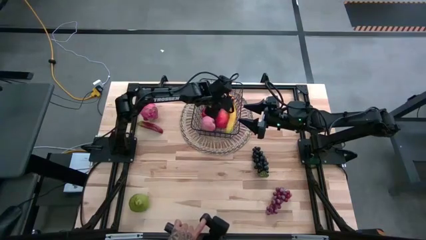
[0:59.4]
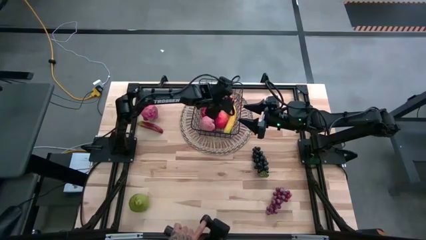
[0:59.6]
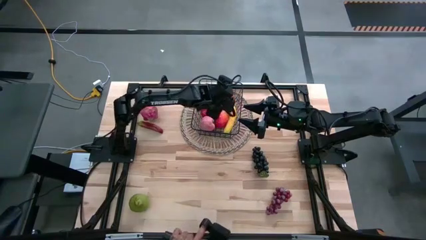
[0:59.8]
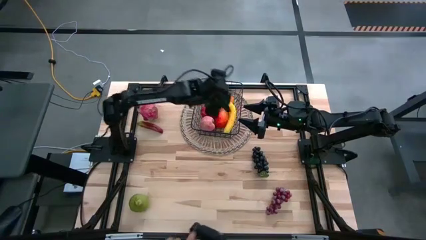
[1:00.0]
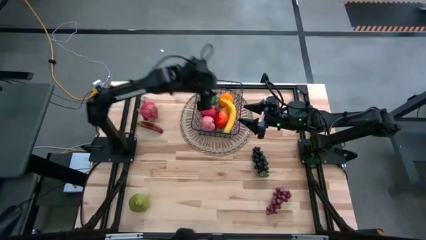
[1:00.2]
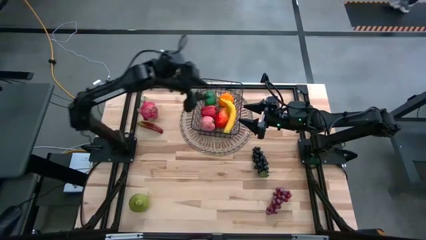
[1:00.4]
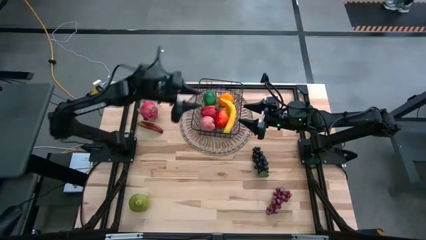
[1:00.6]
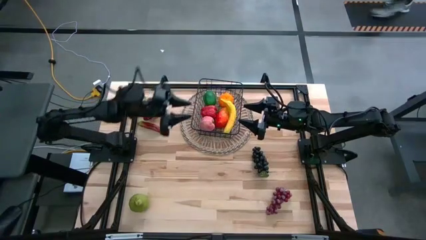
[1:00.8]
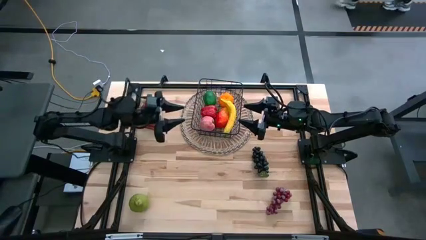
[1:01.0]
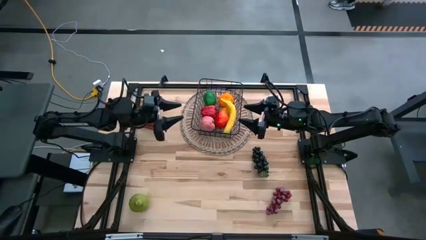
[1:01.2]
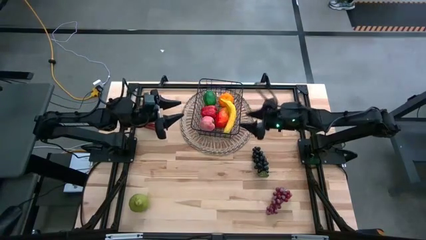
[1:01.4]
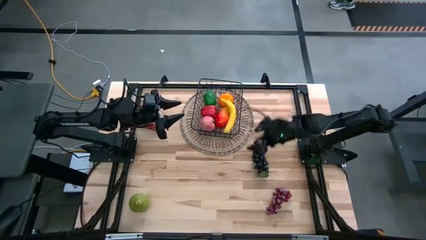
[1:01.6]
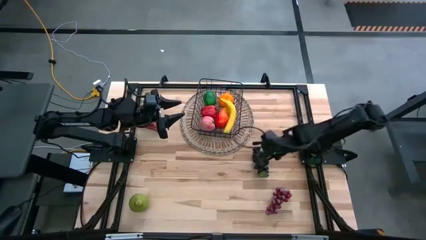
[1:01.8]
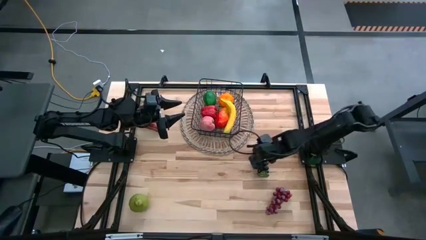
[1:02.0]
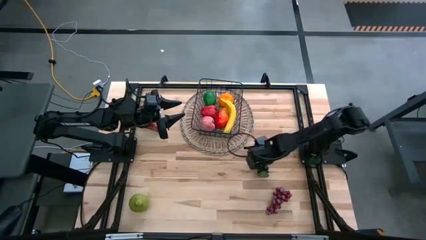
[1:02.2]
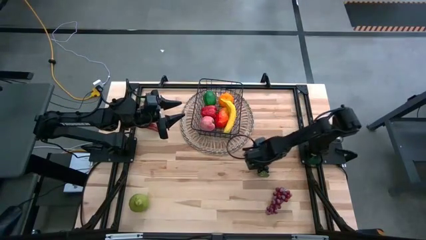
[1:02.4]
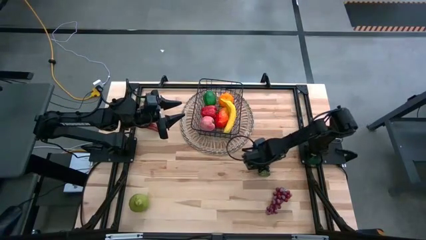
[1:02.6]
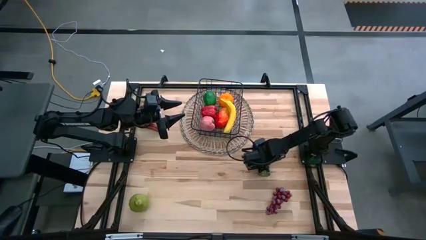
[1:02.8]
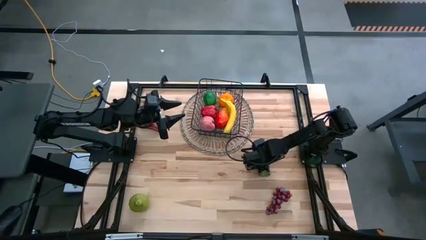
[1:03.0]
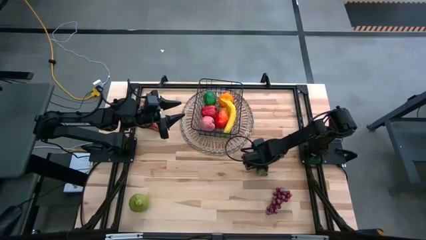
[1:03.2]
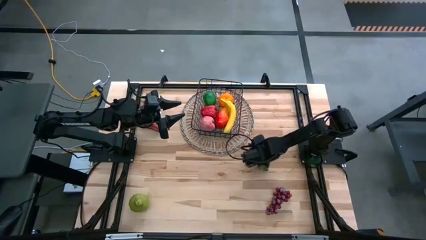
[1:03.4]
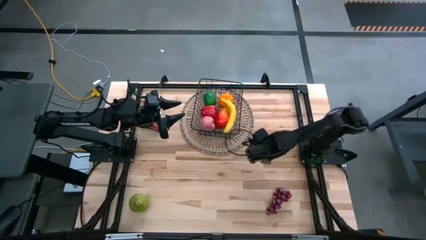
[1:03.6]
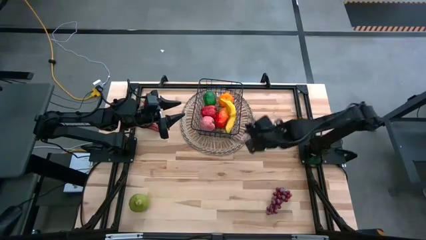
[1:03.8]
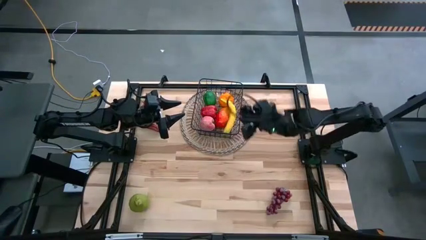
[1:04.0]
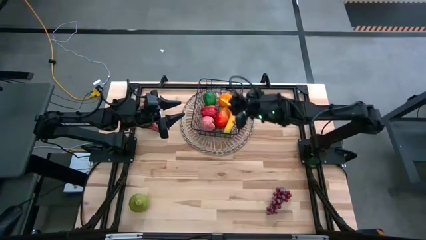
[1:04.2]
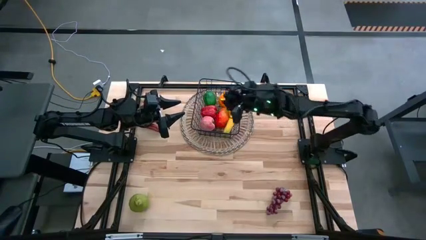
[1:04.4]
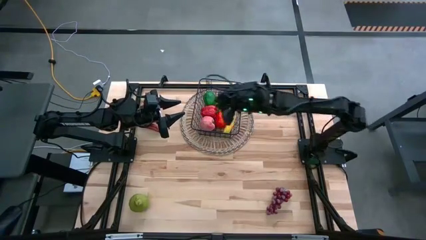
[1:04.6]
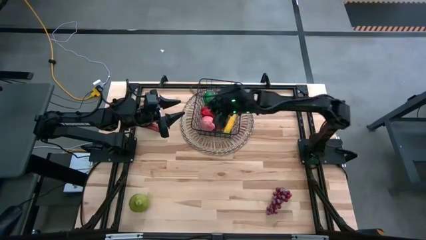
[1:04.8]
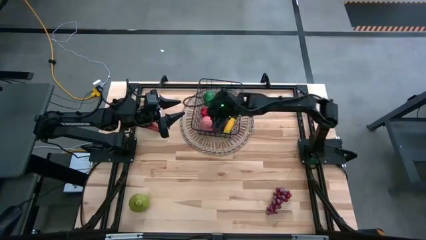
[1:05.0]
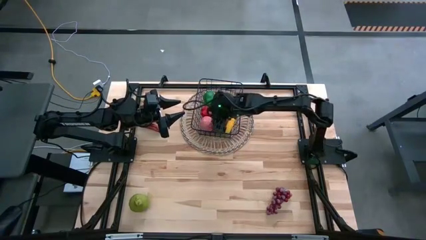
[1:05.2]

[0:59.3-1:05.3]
Task: Build produce basket
Put the black grapes into the black wire basket

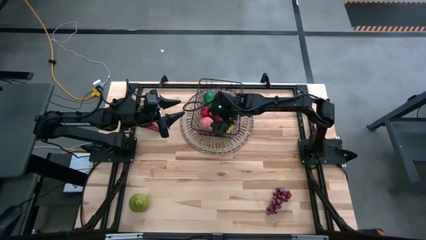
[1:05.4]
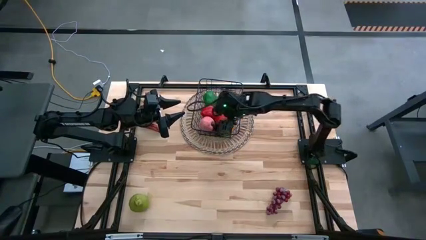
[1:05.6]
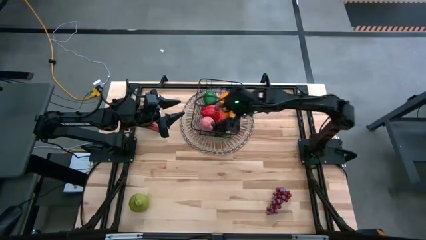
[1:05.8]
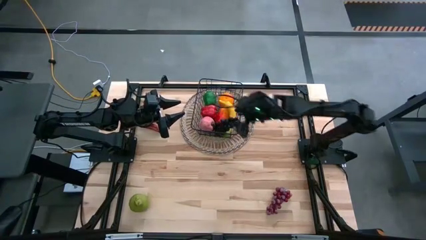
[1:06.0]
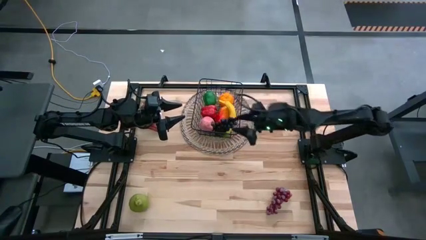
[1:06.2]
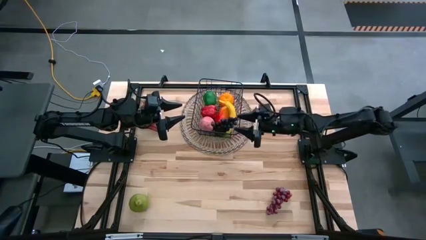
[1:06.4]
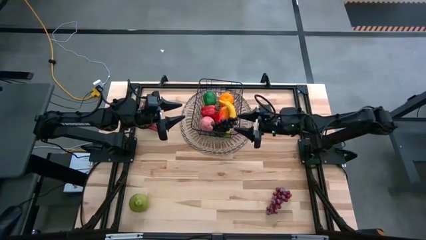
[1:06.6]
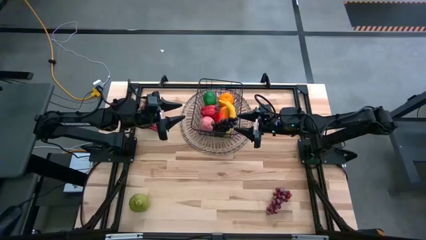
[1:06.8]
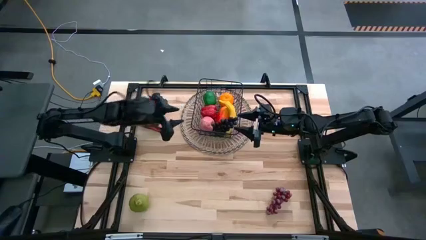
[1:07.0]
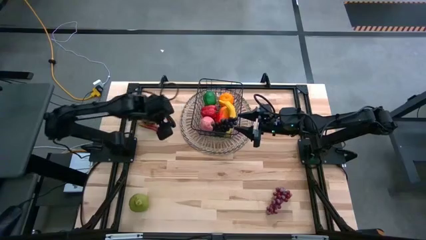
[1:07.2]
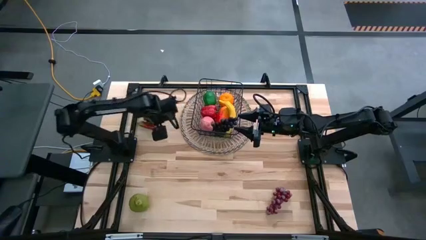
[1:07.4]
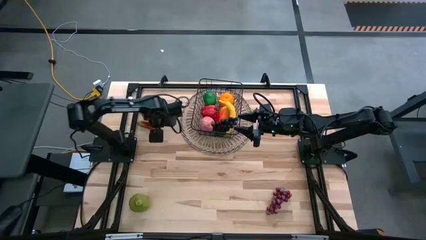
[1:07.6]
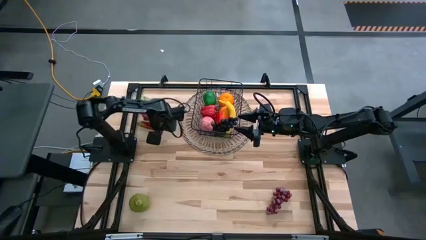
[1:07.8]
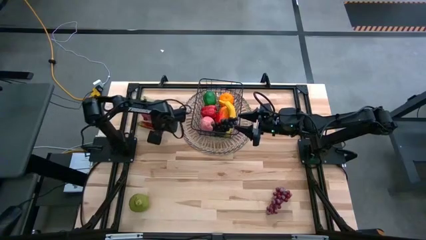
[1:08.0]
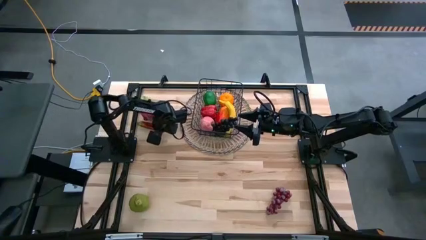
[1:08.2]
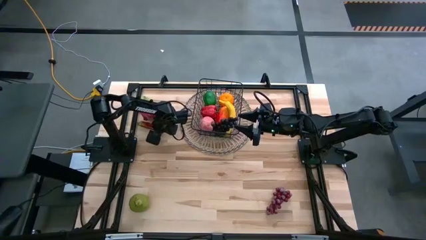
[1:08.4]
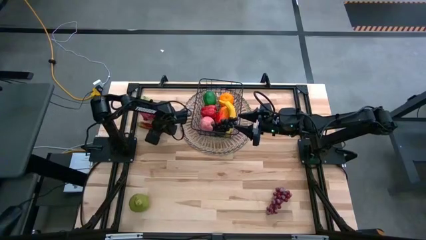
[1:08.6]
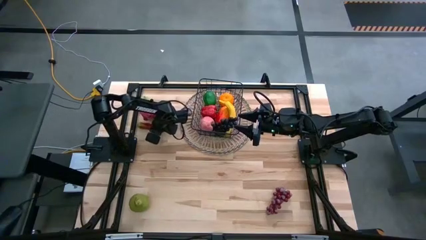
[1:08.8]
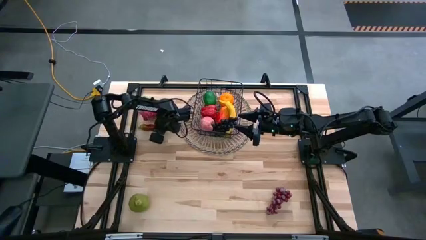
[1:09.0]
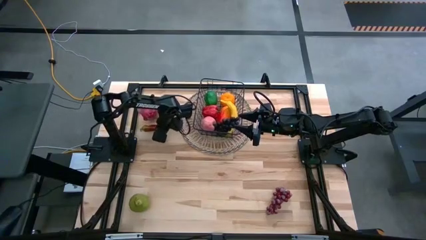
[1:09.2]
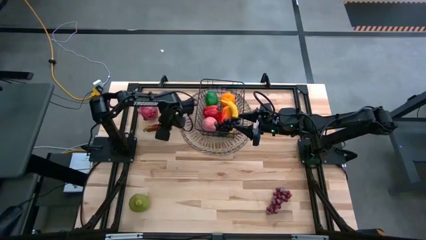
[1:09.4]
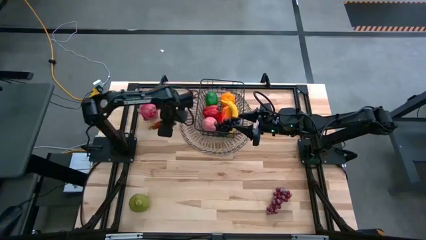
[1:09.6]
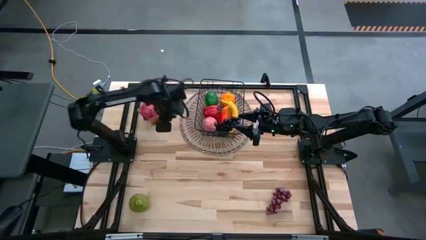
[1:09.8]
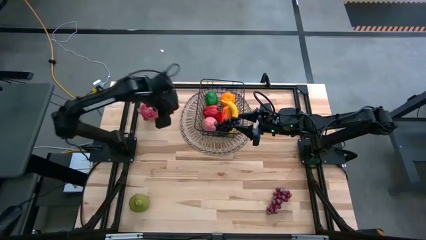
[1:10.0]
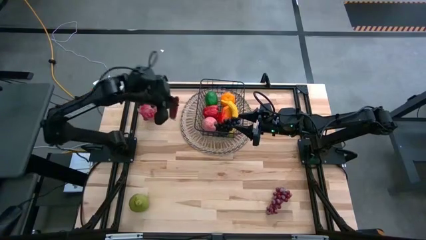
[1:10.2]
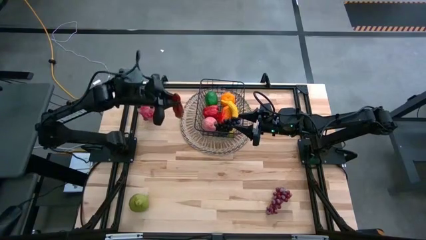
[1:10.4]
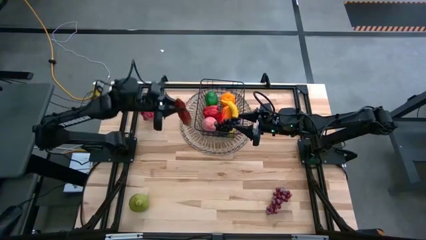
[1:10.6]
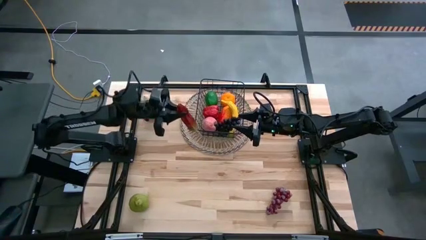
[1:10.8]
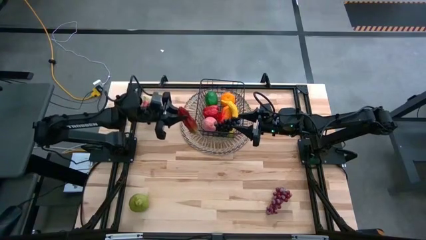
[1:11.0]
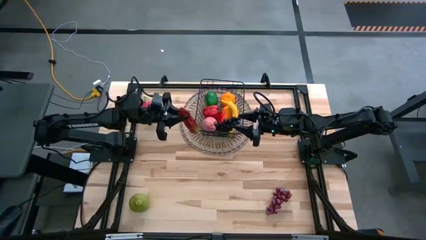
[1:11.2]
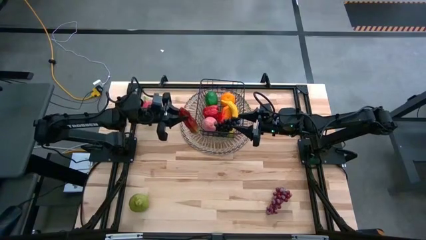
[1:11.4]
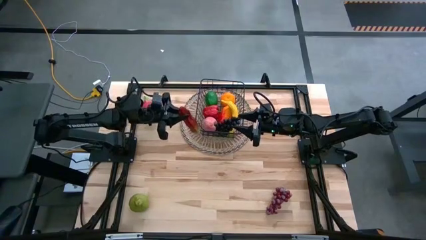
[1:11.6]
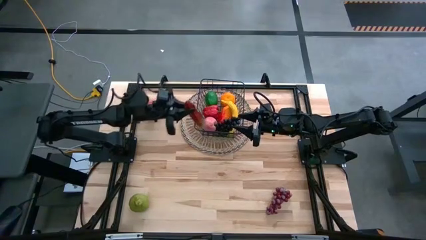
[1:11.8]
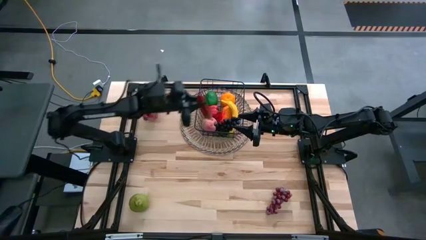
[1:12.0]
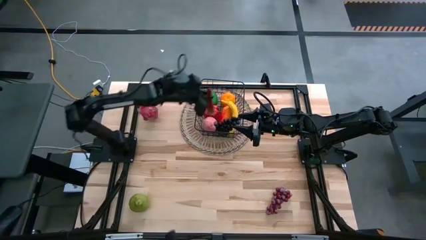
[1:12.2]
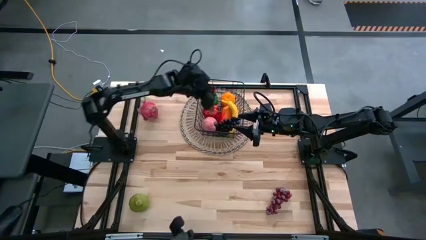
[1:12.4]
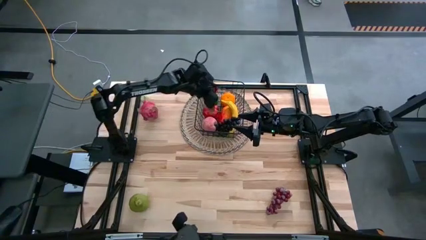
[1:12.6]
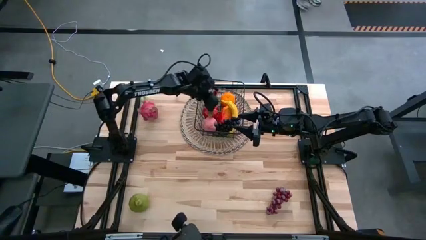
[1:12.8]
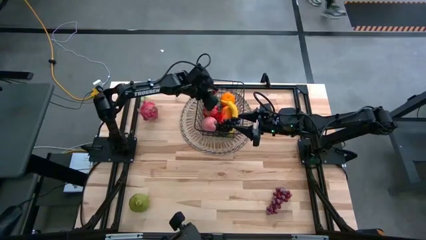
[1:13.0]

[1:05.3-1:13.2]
Put the red chili pepper into the black wire basket

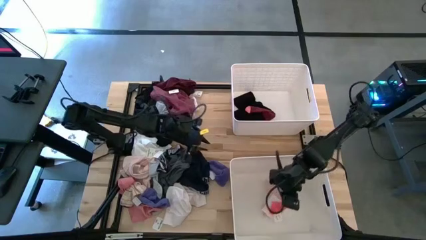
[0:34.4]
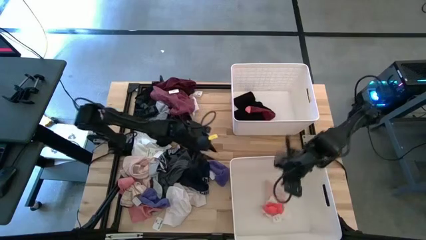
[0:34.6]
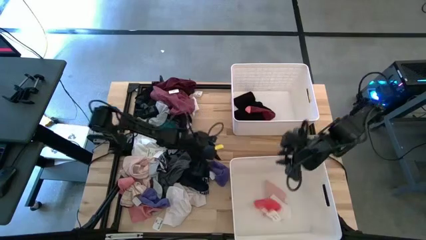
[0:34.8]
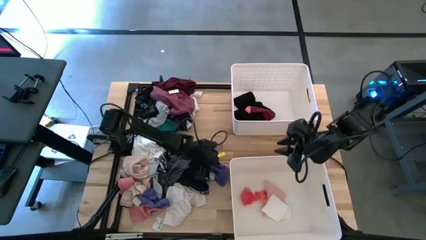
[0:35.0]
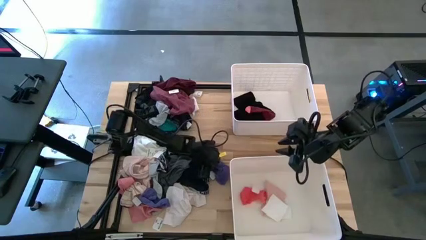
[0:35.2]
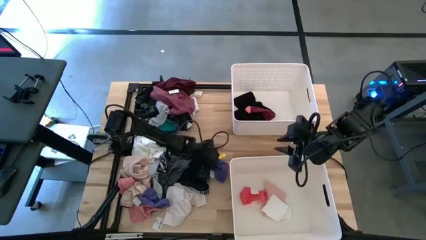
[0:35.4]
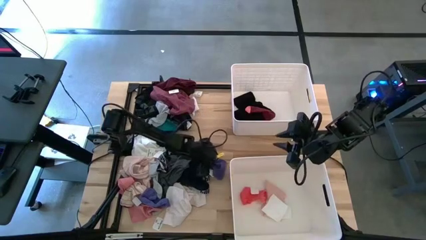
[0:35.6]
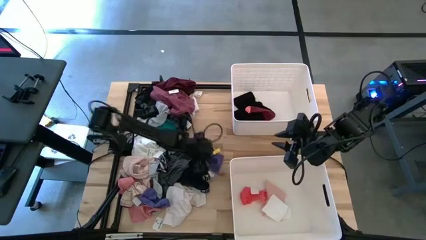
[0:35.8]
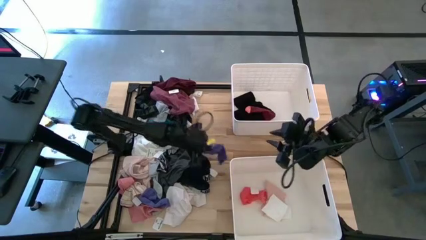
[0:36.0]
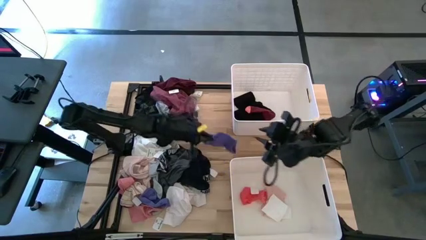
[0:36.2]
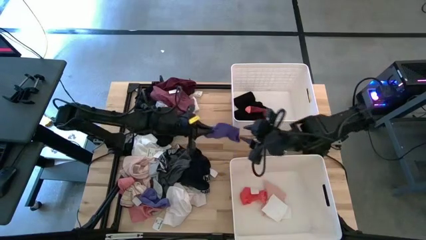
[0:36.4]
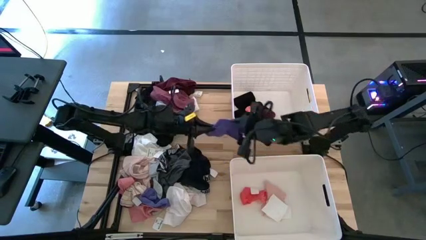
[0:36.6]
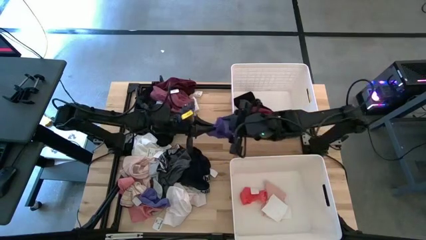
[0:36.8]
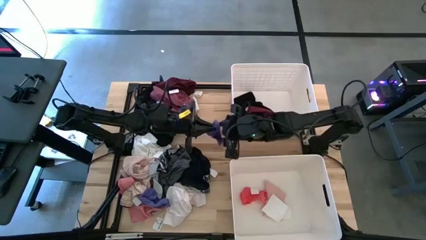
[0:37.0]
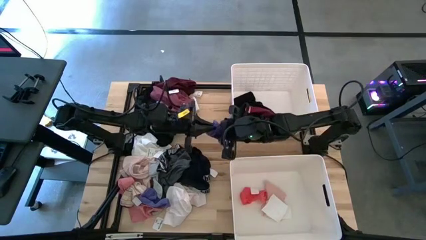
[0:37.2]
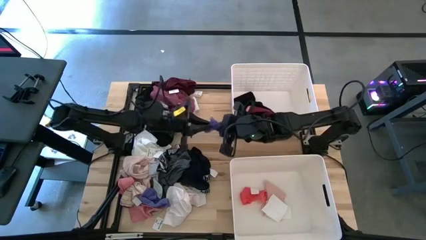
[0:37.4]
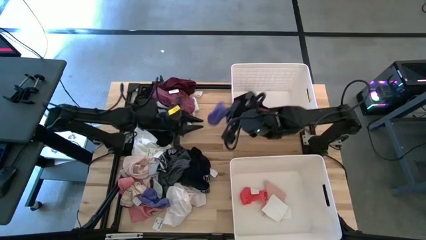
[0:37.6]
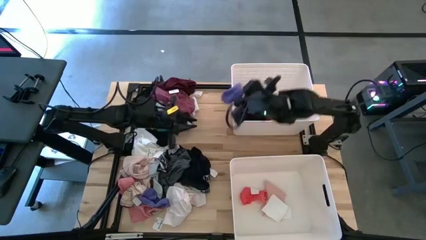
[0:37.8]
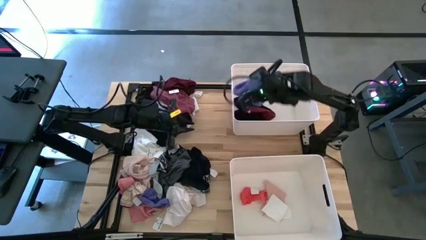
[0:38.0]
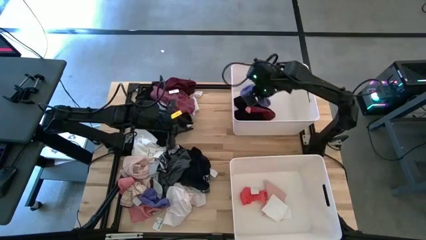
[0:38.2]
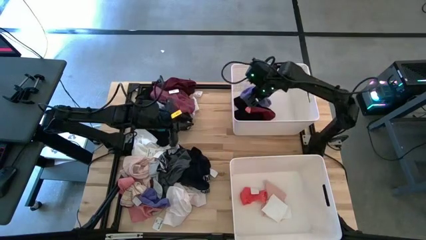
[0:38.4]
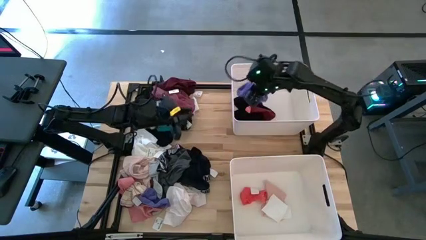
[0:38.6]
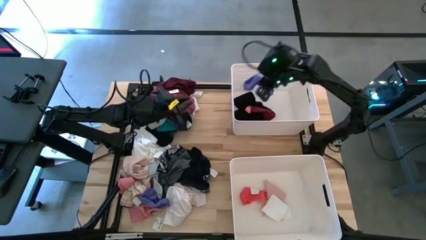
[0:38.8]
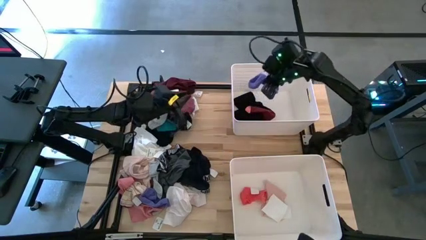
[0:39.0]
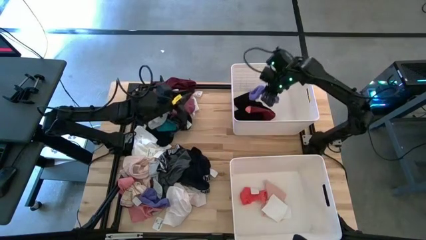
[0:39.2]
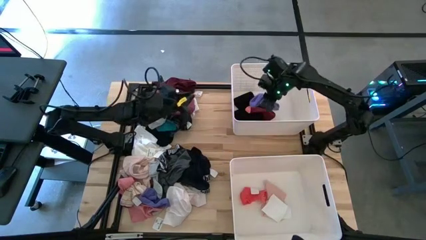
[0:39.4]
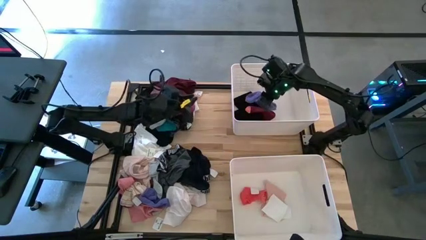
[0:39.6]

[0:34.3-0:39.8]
Task: Sort clothes
Put the blue sock into the top bin
